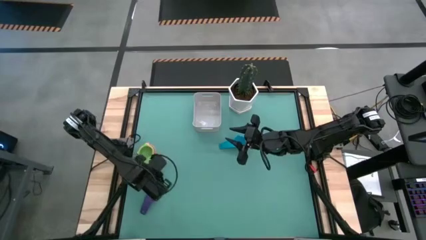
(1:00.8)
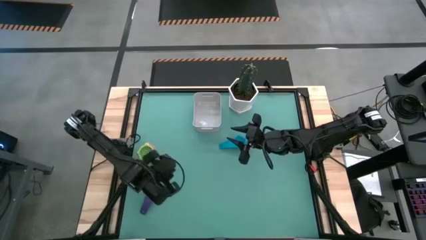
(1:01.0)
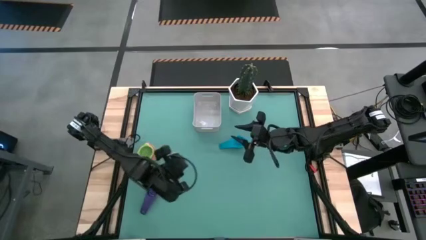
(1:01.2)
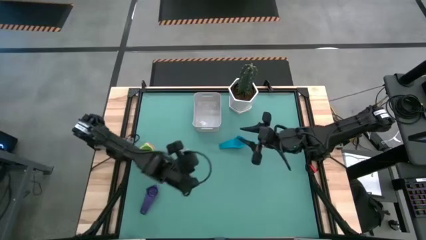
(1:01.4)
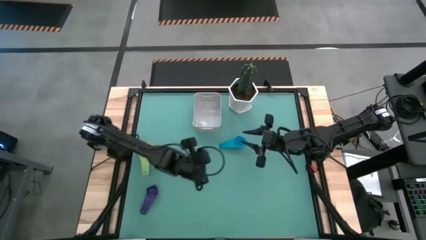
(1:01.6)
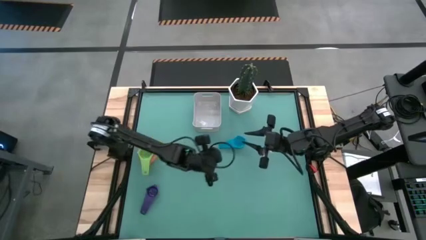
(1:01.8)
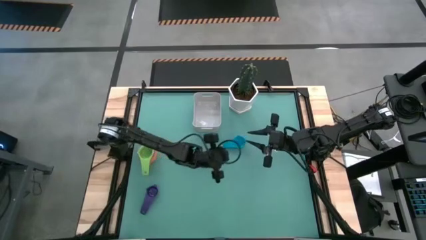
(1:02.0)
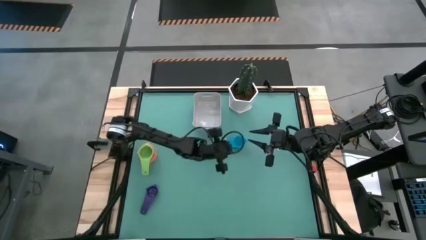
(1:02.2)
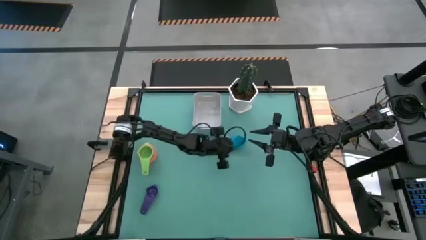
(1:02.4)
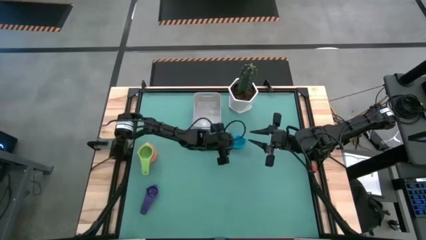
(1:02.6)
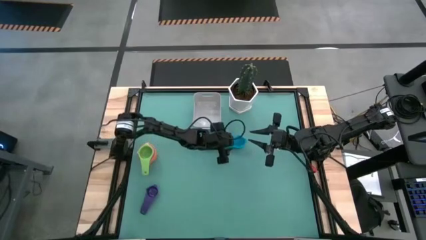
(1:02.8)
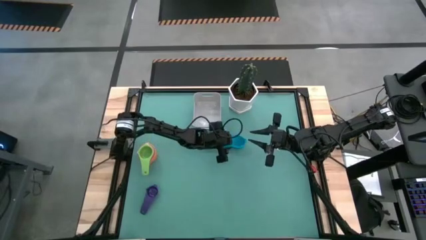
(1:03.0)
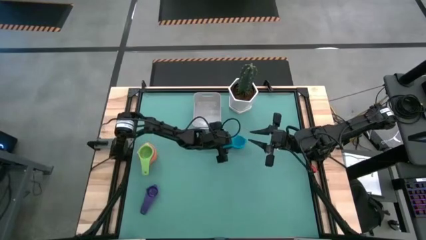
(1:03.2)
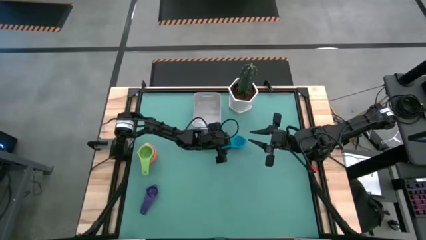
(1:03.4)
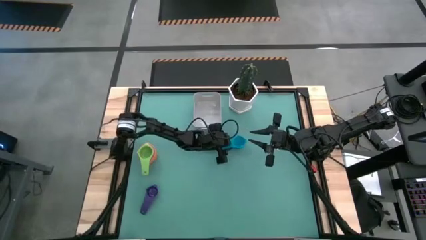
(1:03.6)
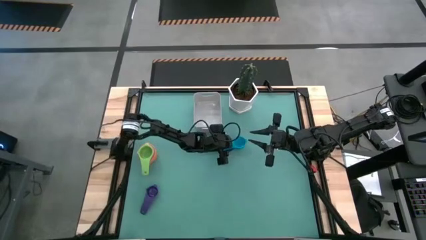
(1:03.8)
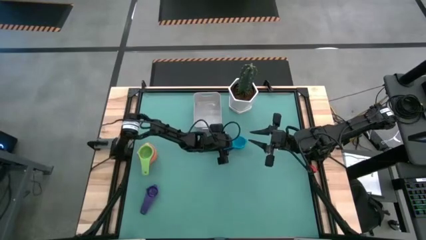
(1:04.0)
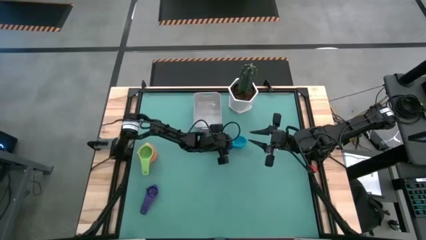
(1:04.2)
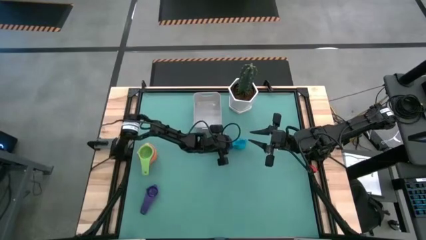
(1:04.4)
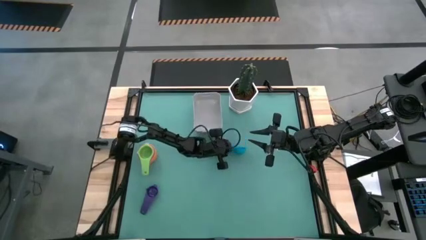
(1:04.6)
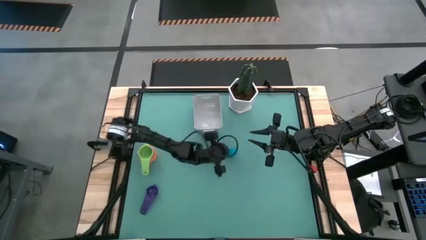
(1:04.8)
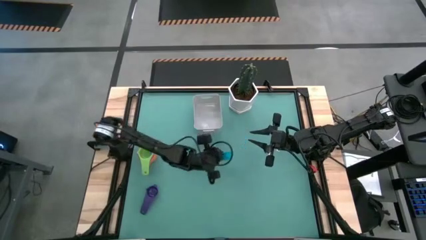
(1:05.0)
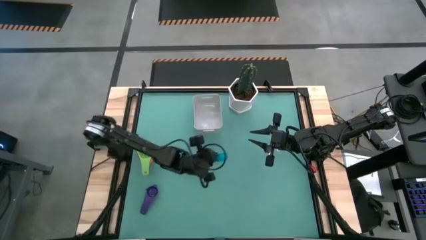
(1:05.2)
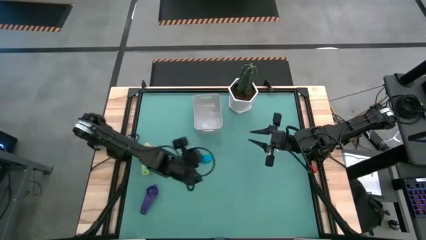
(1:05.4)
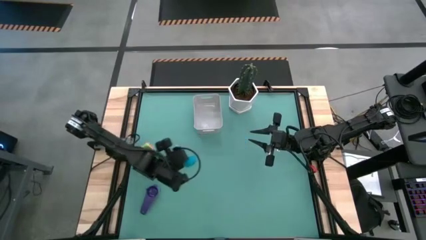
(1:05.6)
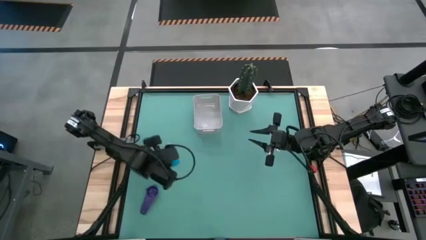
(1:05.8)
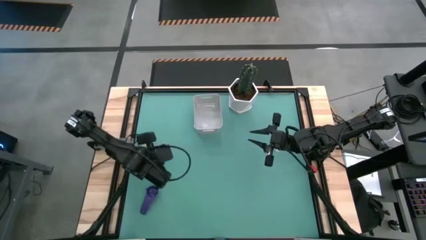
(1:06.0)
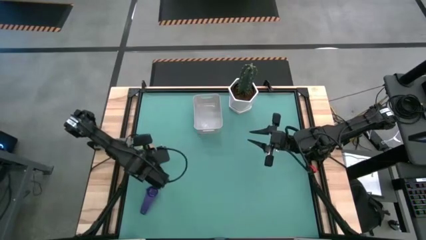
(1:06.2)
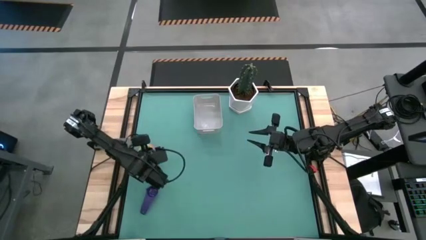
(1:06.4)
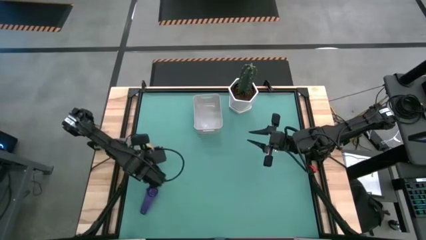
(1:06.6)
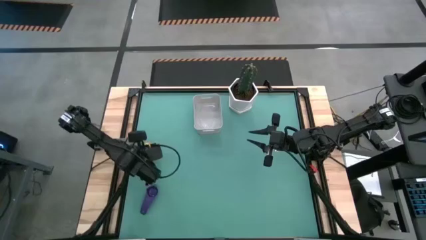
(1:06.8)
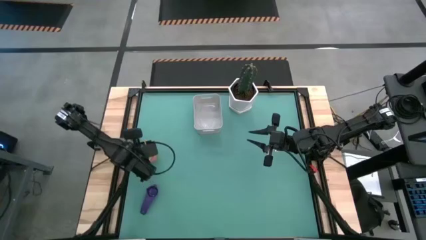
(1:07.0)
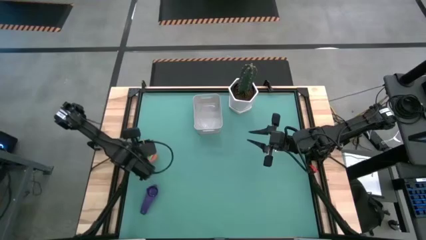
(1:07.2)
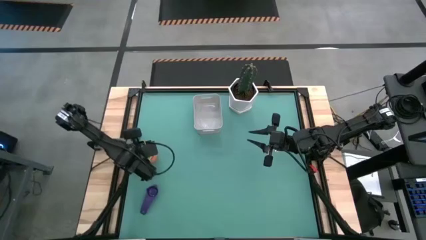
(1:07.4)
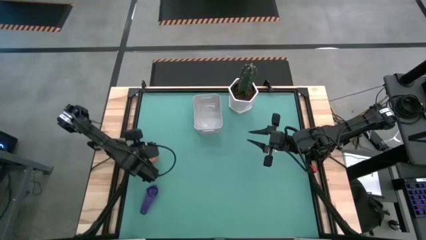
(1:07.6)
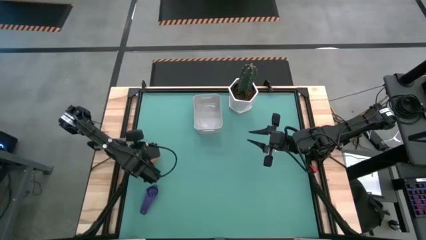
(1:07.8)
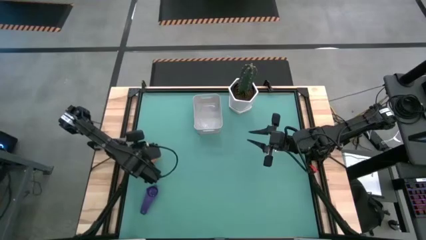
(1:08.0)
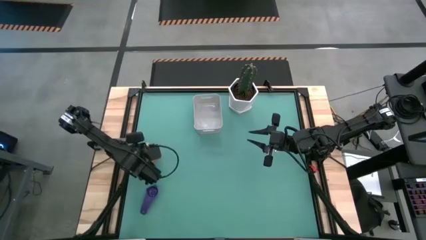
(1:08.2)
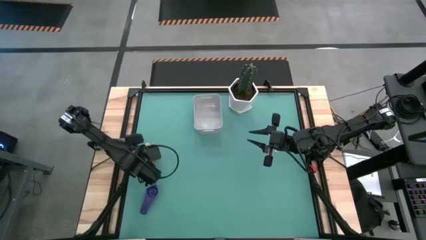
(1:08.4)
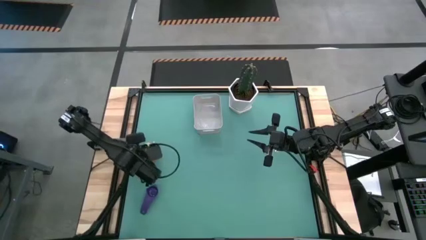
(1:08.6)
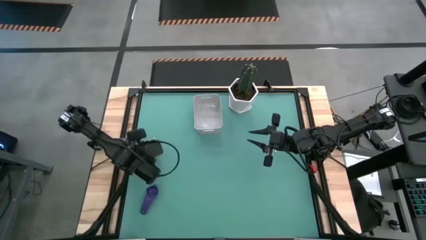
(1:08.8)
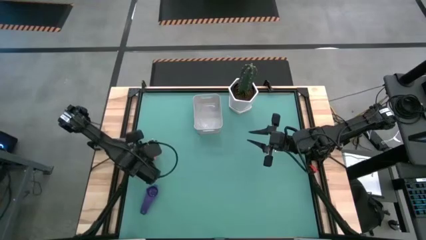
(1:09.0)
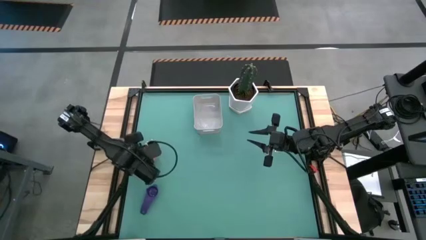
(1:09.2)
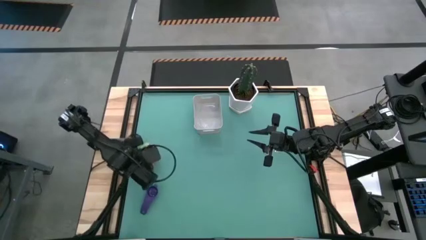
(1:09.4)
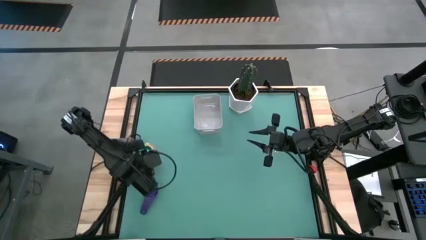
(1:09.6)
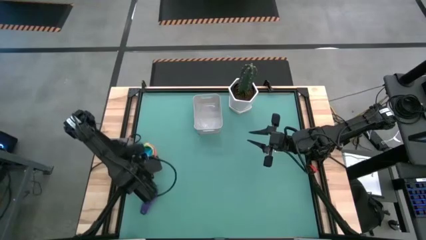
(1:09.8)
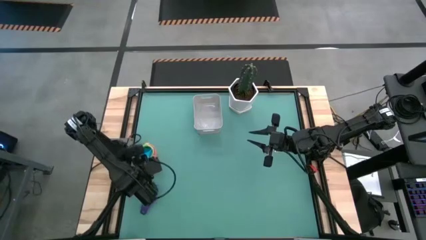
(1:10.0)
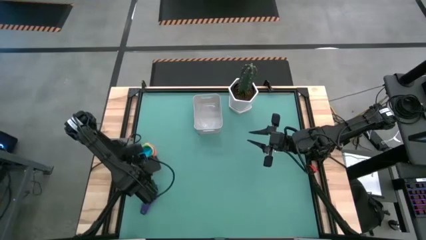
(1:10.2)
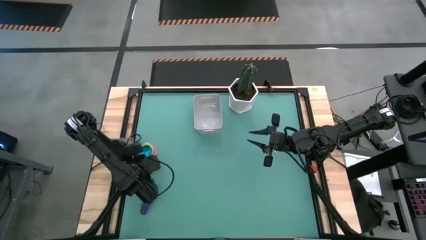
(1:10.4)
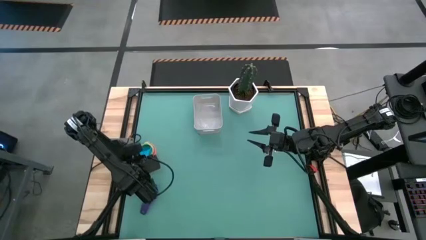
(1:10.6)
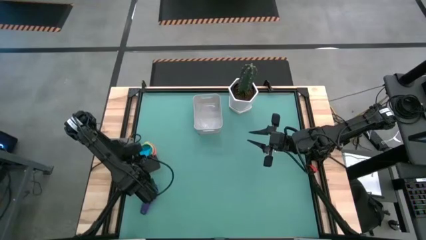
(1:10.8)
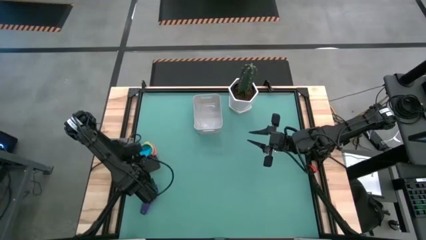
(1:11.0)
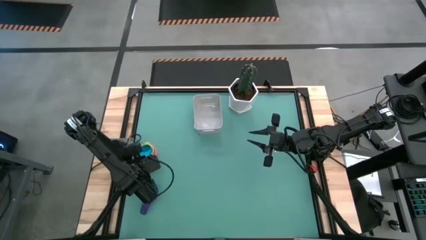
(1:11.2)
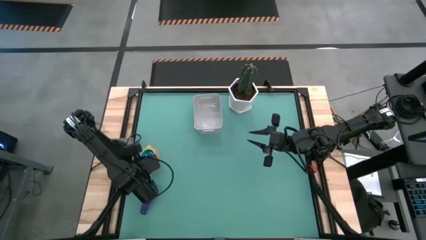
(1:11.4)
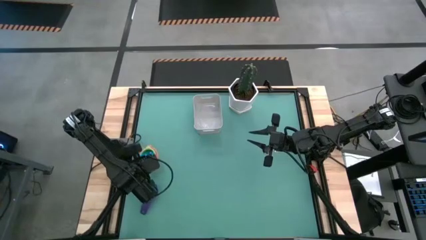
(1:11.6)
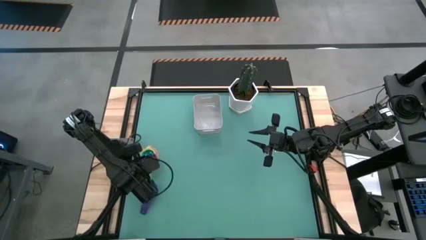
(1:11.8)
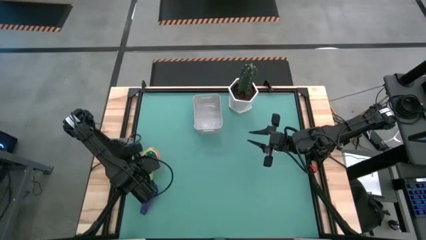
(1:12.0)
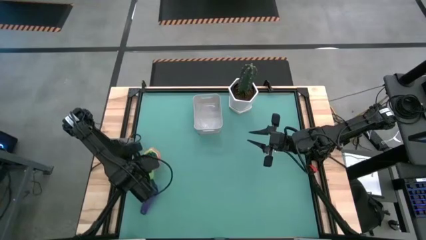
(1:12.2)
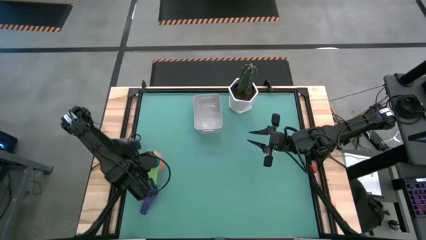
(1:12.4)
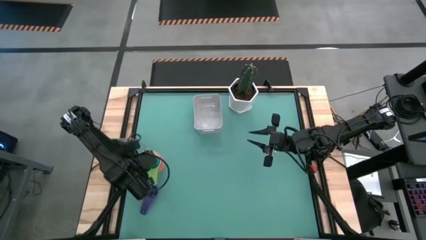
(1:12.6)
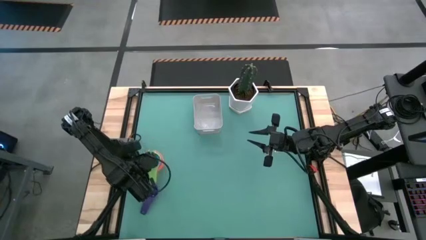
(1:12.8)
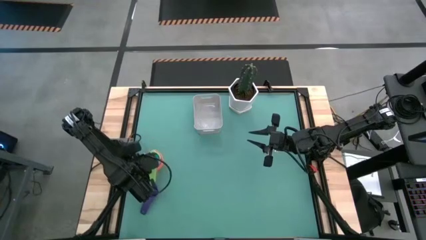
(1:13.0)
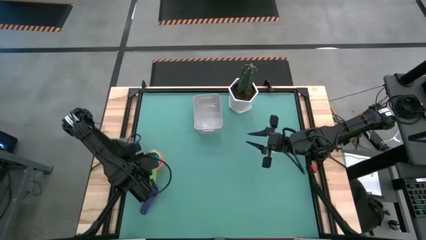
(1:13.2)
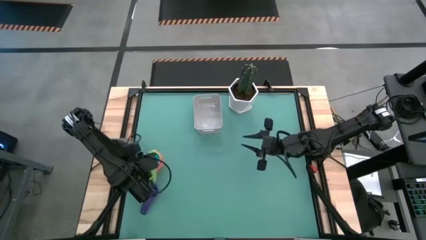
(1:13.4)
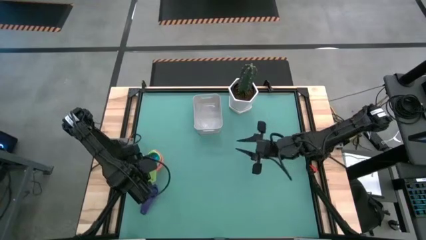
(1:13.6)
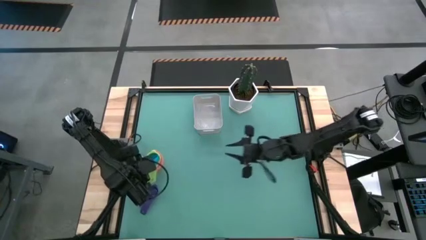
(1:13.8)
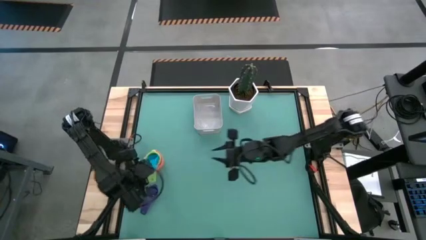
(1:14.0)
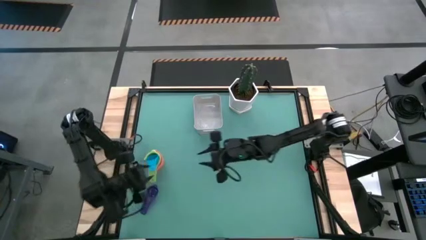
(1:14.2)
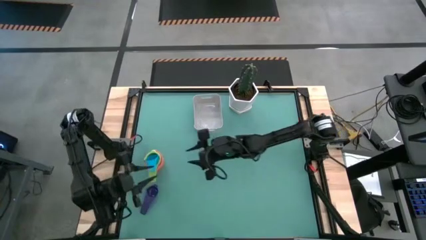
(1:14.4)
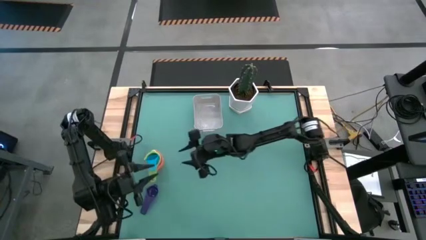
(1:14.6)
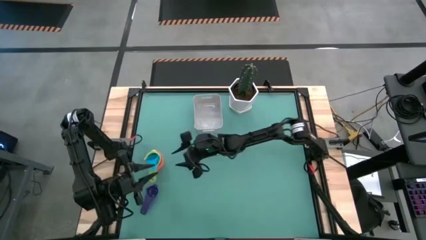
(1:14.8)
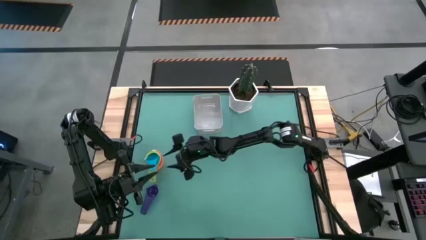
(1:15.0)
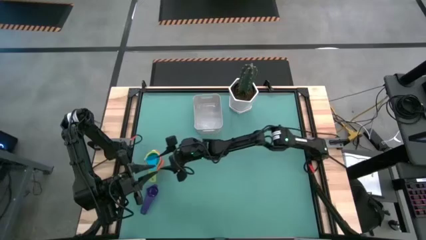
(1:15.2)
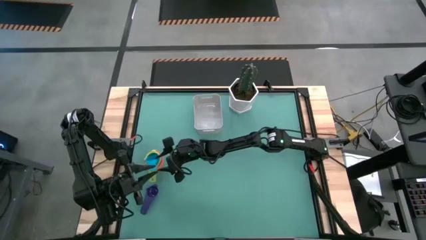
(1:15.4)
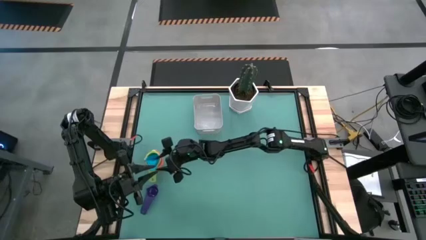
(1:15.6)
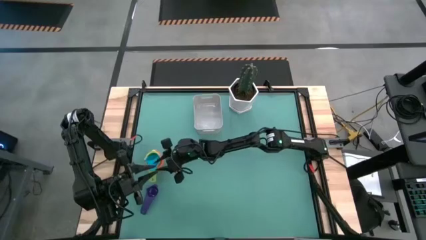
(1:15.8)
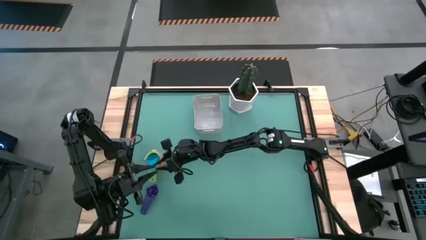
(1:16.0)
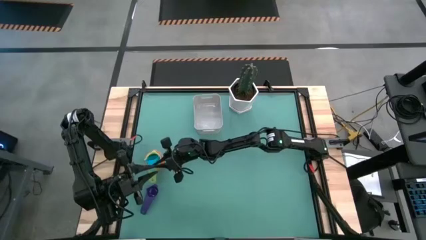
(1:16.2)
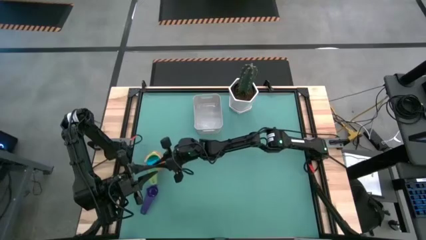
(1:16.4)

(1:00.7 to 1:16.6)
Task: Nest measuring cups in basket
Stack the blue measuring cup on top of the green measuring cup
